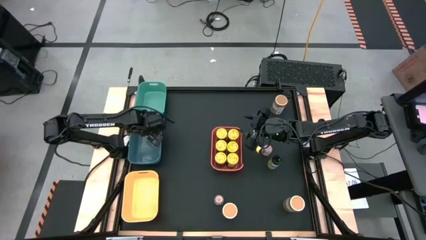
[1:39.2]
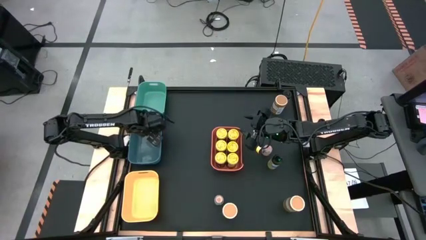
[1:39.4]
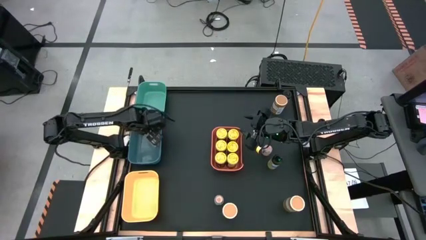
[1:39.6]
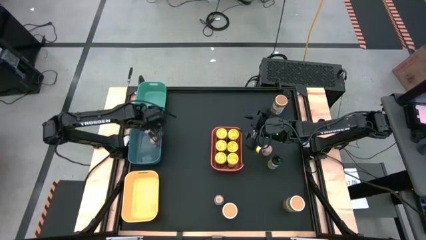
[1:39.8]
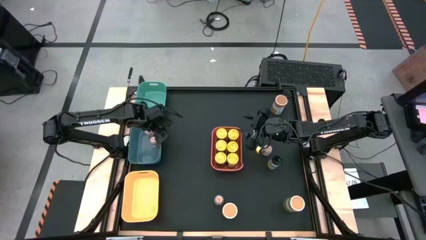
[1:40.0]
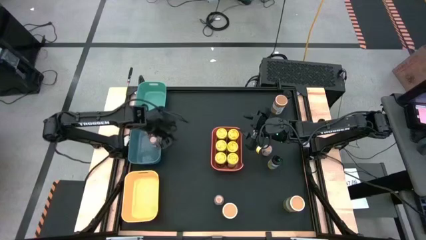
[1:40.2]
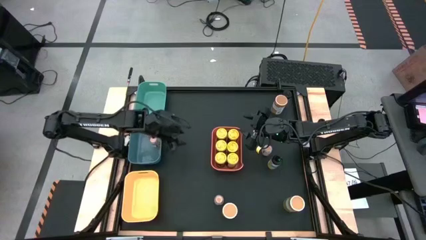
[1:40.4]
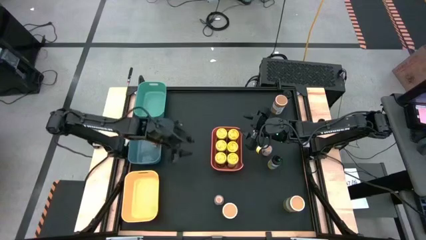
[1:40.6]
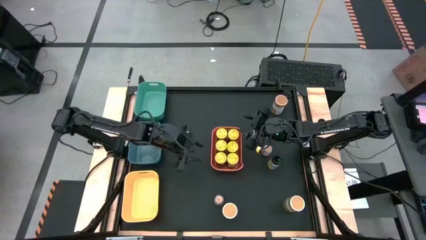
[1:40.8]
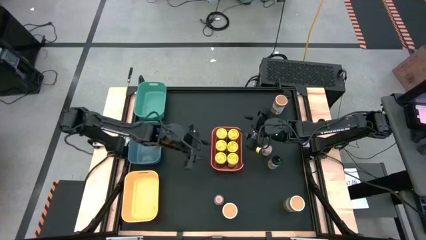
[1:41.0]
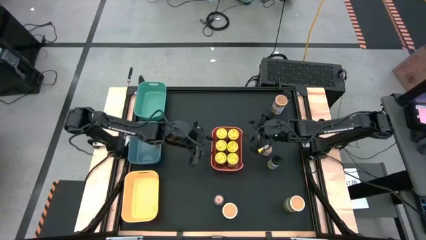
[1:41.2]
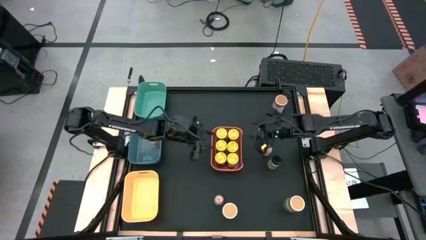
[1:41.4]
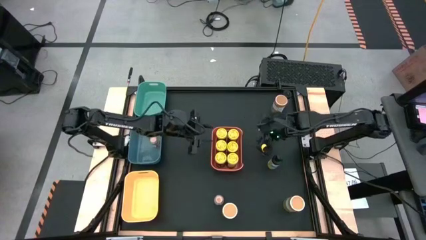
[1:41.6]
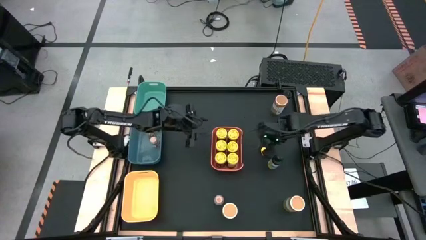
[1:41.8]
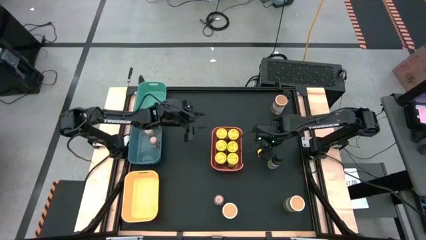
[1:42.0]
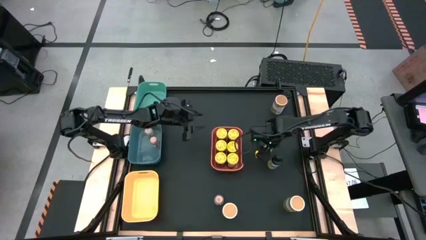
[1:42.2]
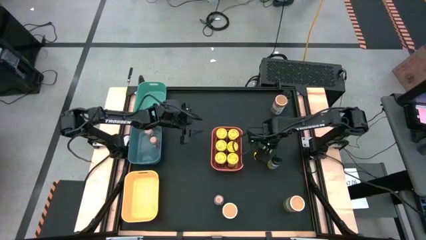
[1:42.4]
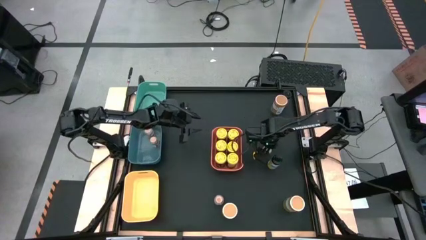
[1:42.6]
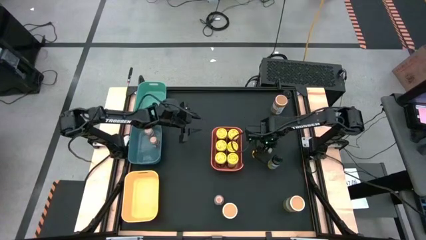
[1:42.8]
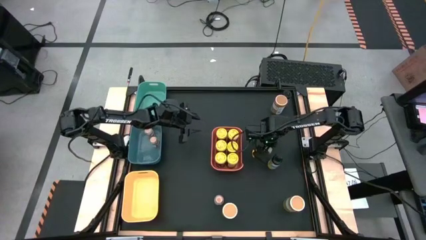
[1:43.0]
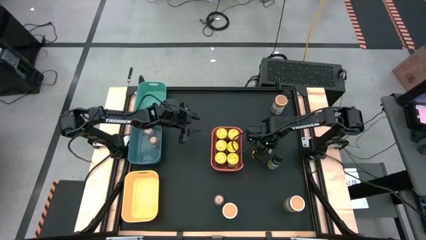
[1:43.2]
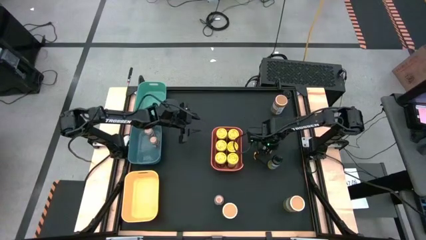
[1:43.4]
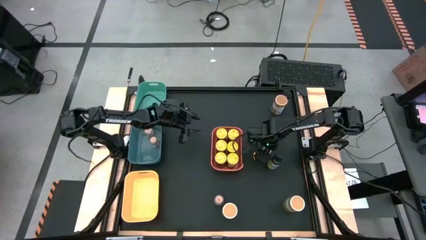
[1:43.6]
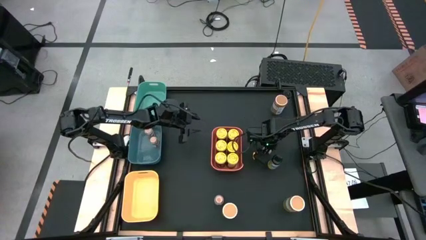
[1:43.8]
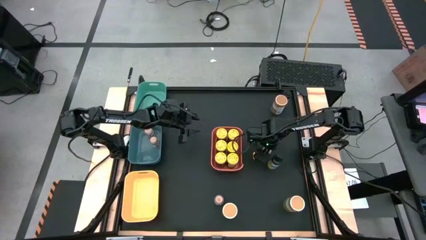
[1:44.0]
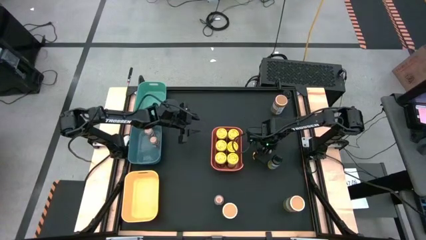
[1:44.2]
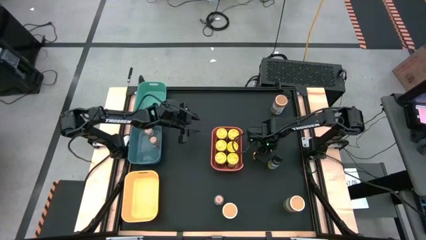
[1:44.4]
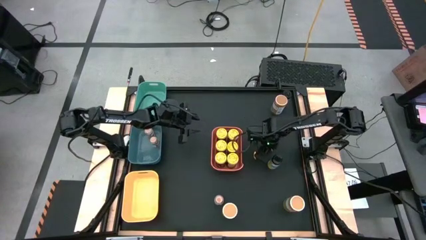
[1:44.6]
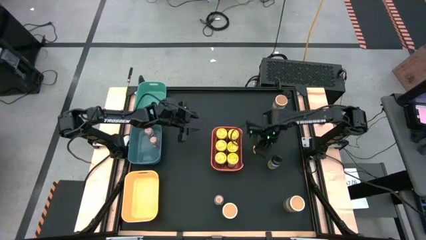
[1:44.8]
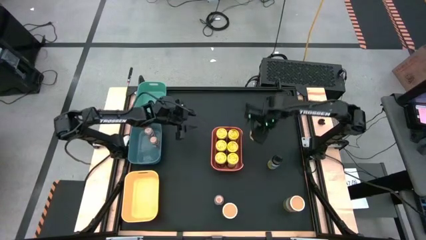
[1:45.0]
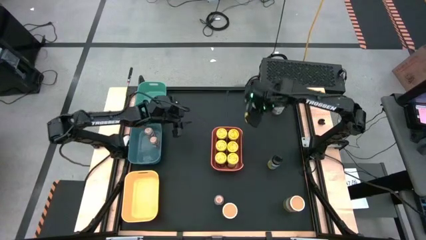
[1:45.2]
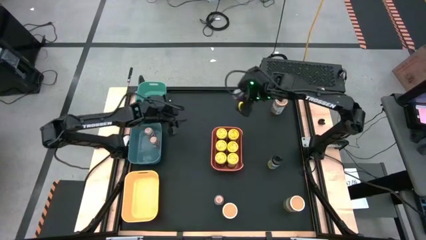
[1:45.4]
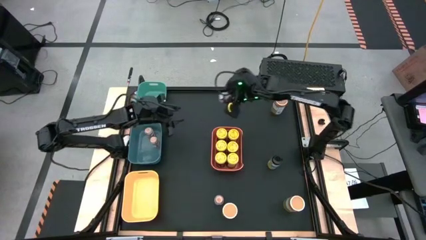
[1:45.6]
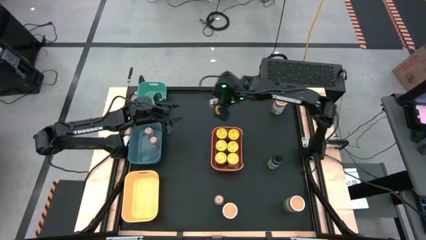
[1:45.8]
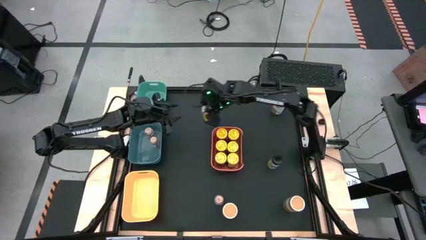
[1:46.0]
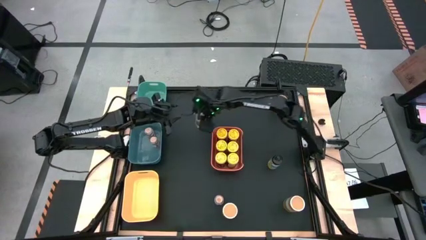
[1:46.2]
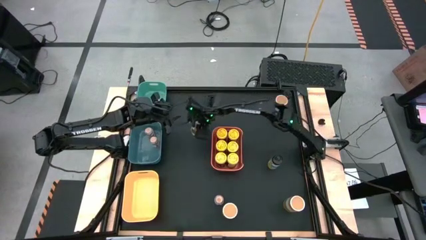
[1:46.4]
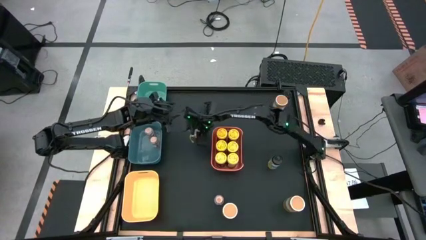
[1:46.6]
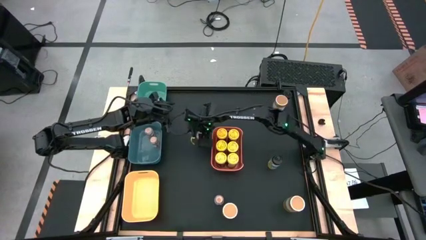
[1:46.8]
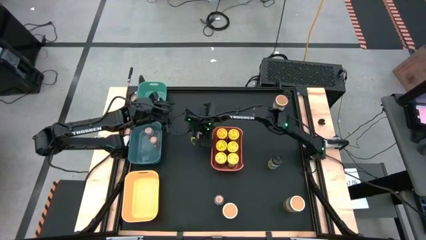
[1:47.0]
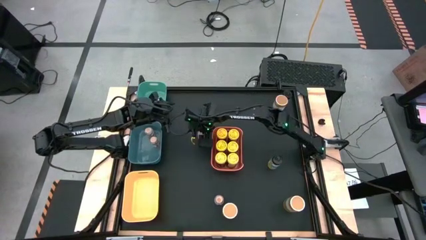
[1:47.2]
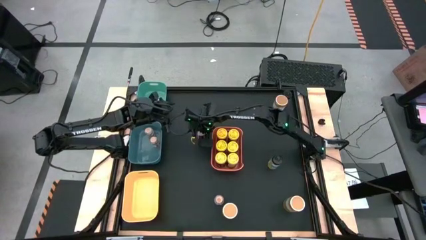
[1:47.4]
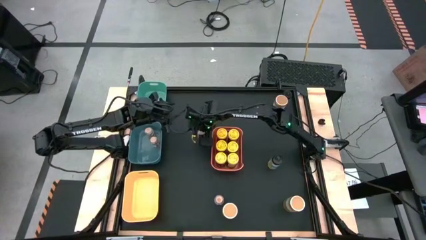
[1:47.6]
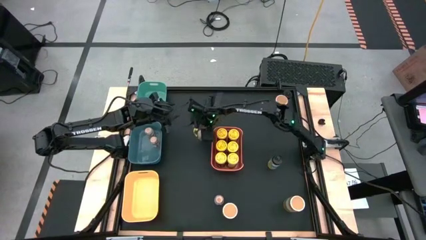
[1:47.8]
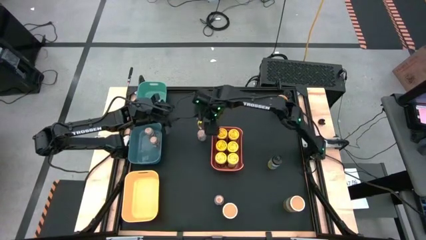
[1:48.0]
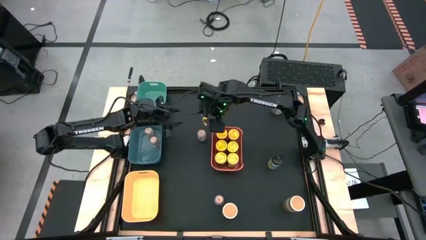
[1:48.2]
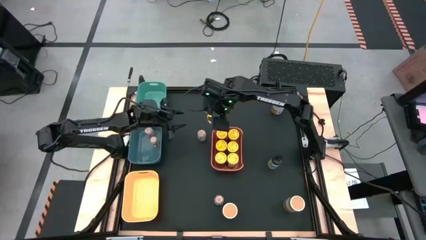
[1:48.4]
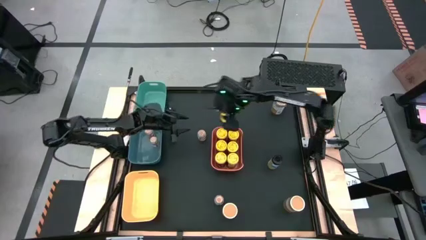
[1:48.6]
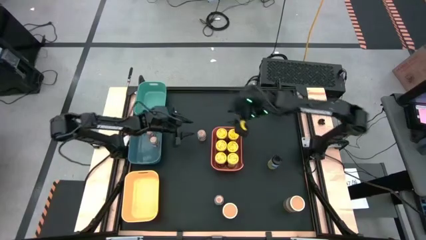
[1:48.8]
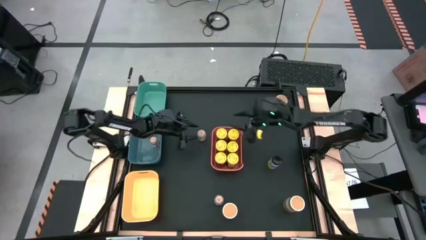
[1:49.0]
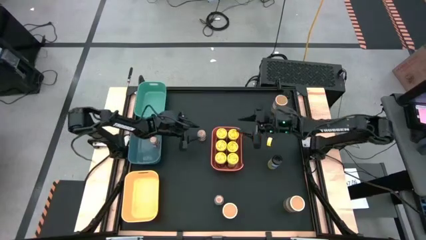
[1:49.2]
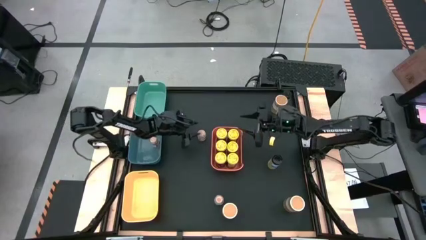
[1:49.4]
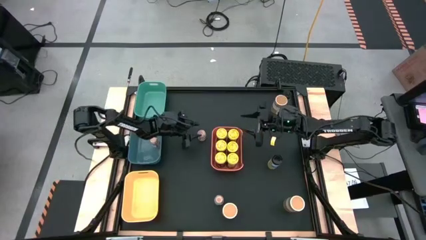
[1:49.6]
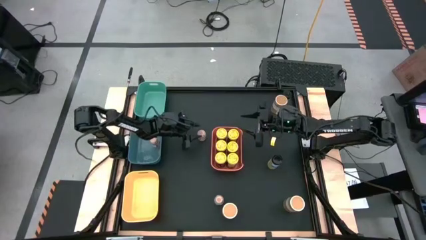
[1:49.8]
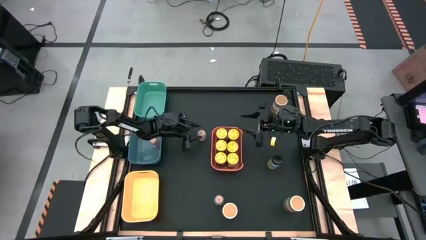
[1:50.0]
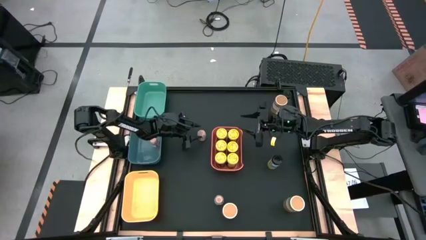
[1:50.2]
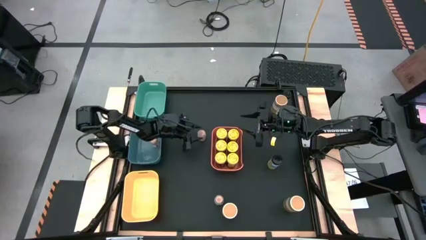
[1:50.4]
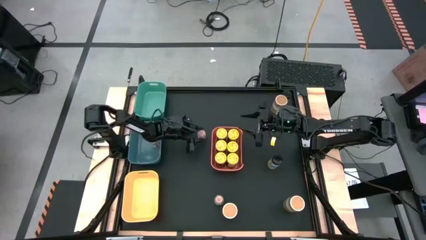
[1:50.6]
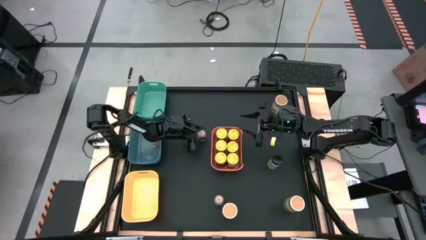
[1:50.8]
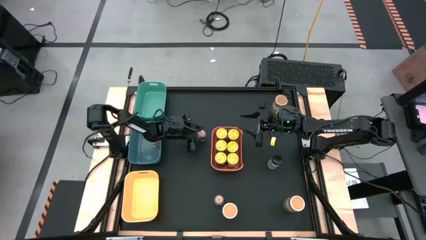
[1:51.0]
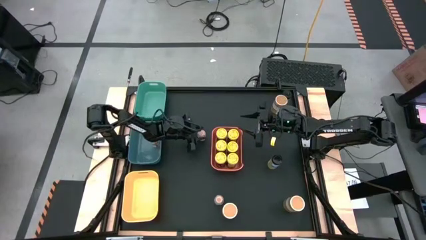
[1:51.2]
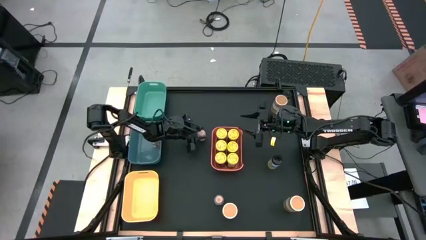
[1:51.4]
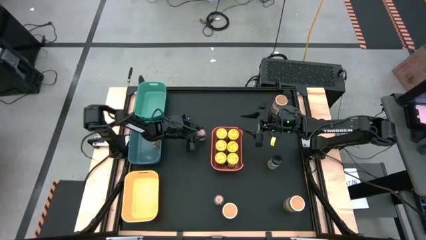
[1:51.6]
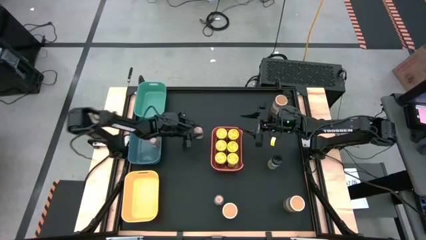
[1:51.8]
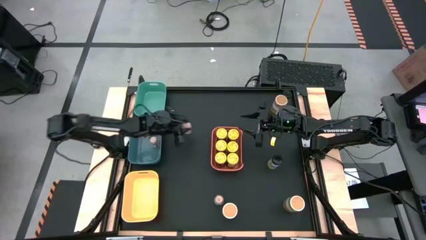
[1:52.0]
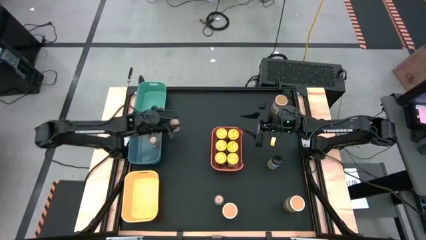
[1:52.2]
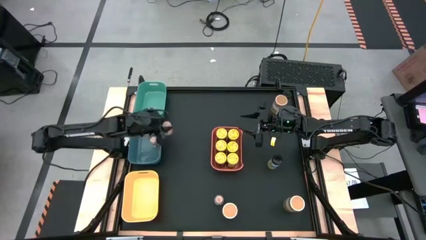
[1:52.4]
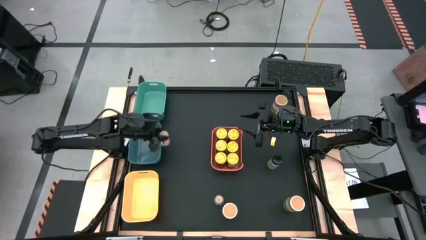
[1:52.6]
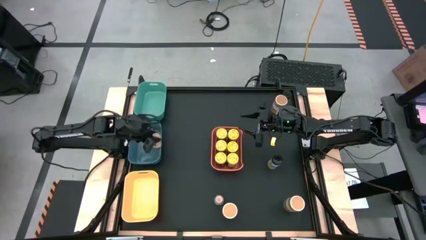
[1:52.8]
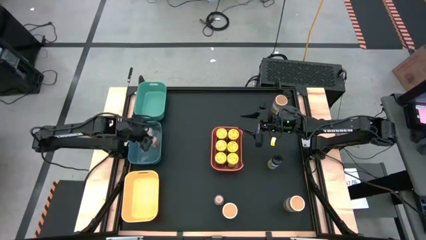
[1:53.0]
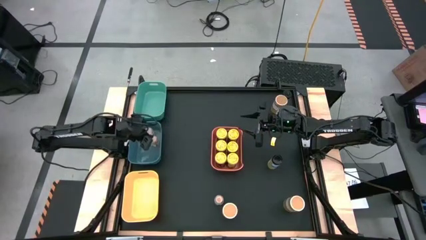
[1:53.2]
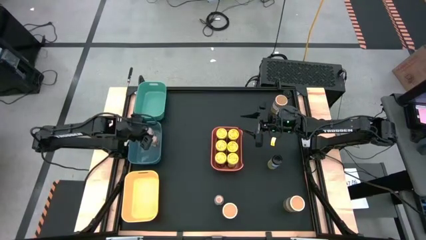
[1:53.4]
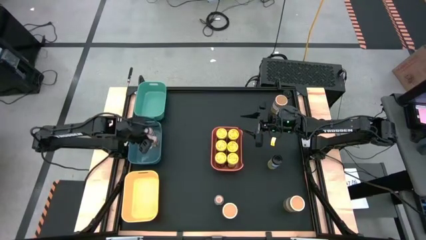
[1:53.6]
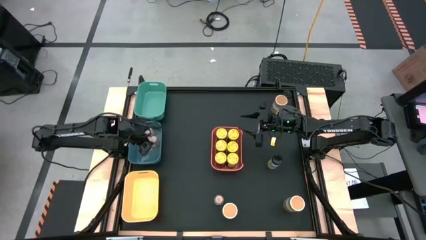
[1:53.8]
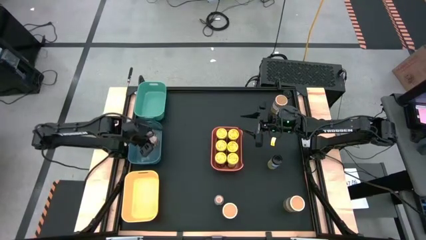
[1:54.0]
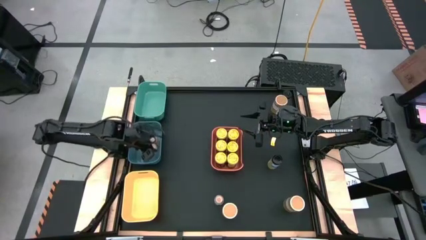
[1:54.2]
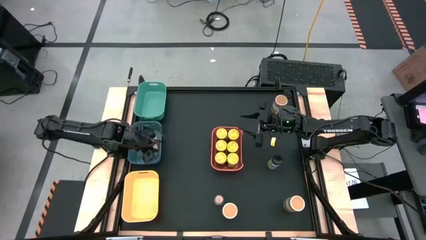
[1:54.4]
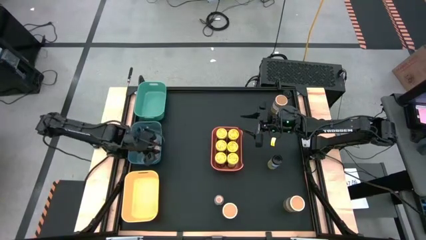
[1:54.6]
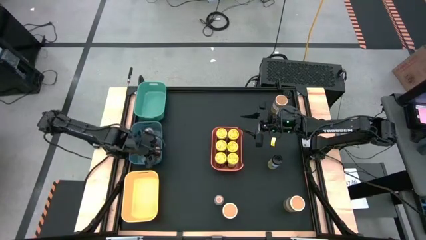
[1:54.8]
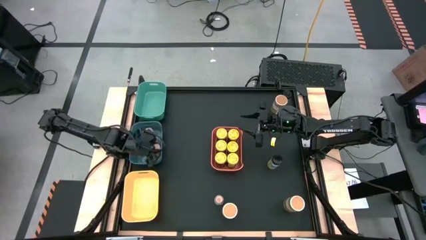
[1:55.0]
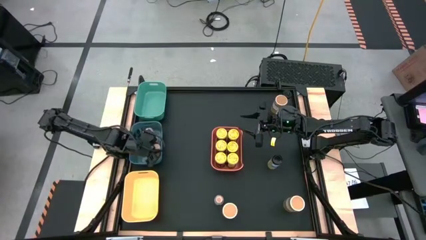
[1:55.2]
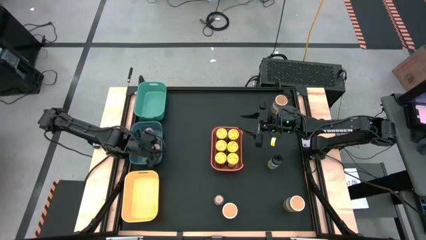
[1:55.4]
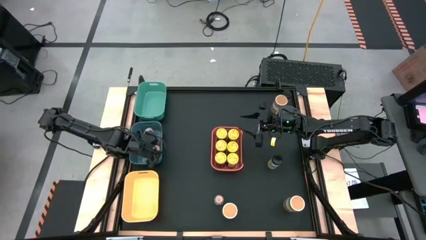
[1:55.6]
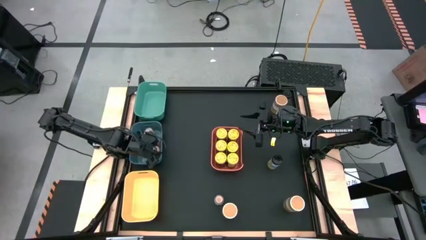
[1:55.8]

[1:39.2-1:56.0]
Task: Sort spices by type
Put the brown seasoning bottle in the blue bin
